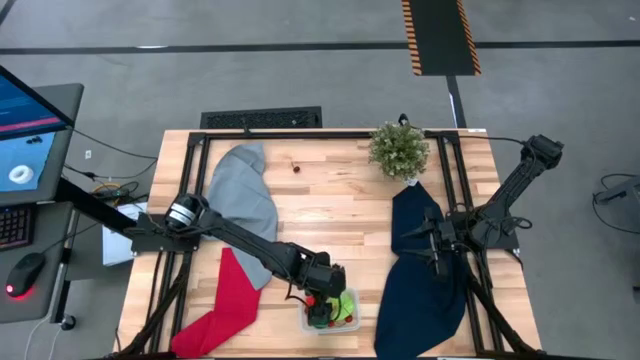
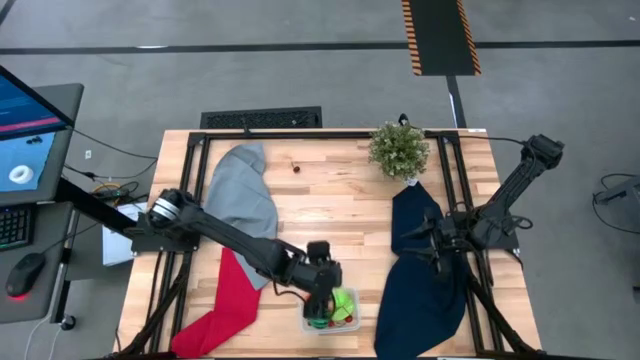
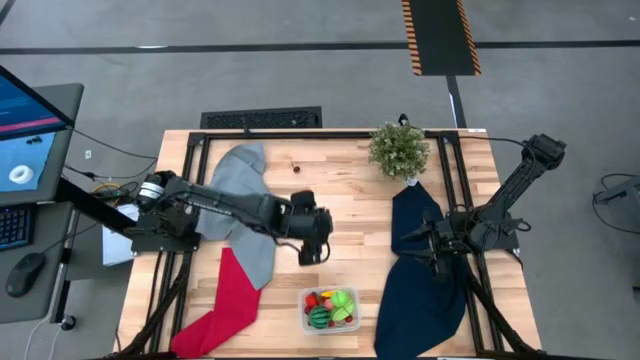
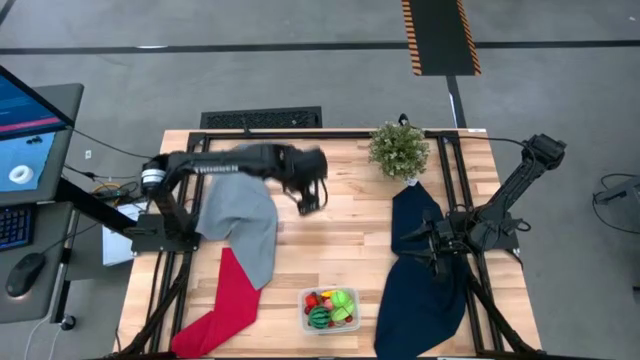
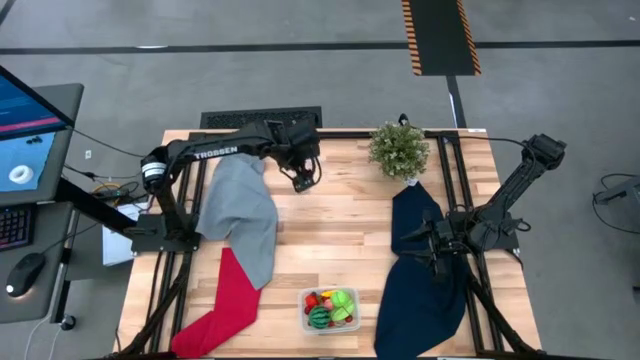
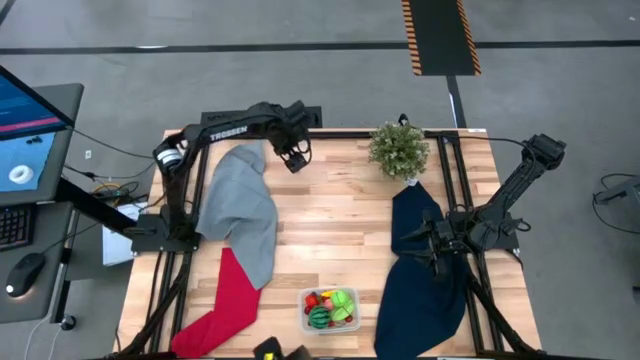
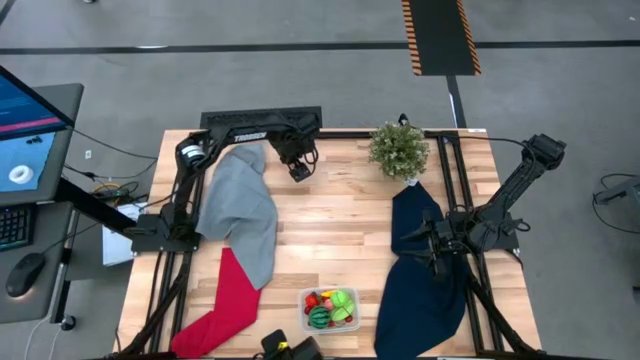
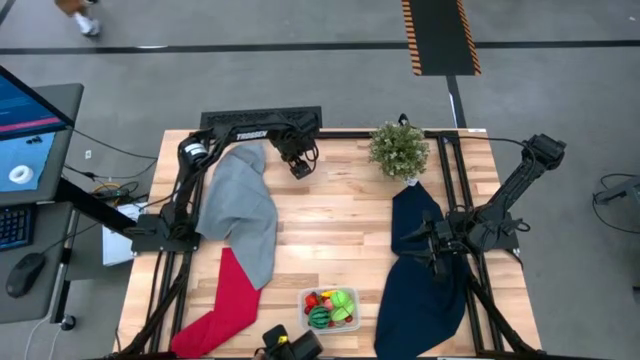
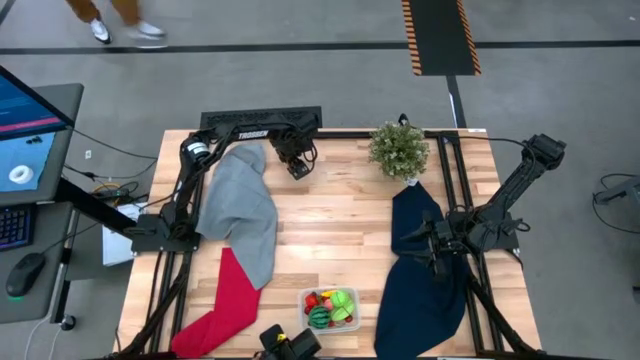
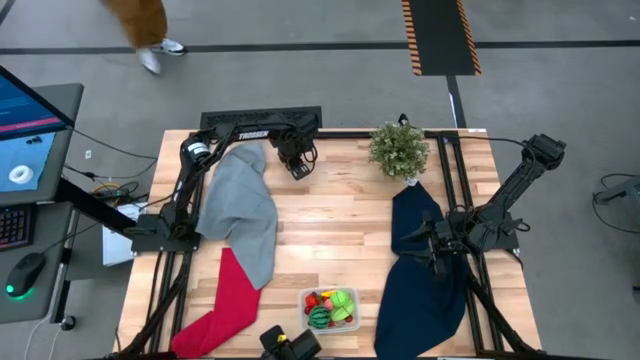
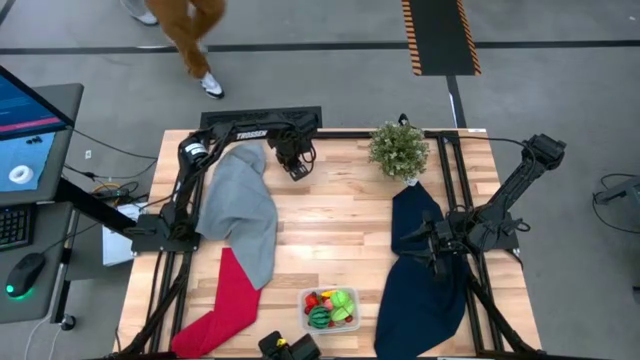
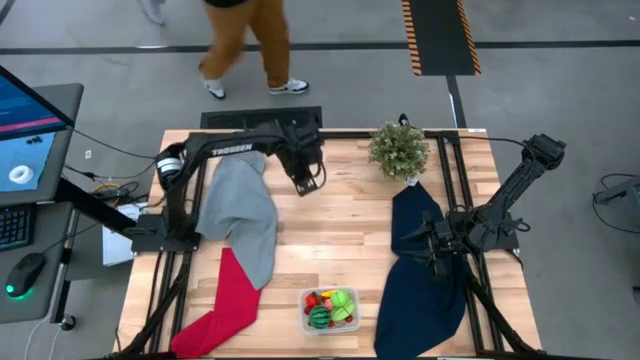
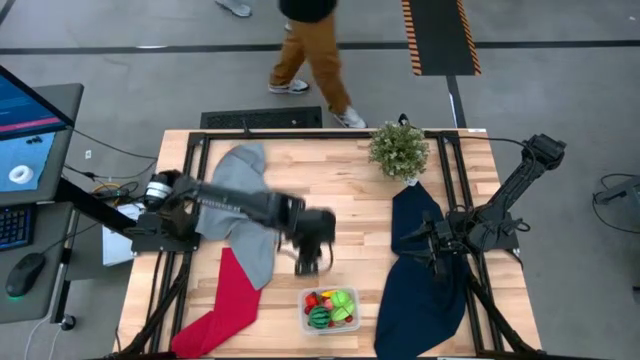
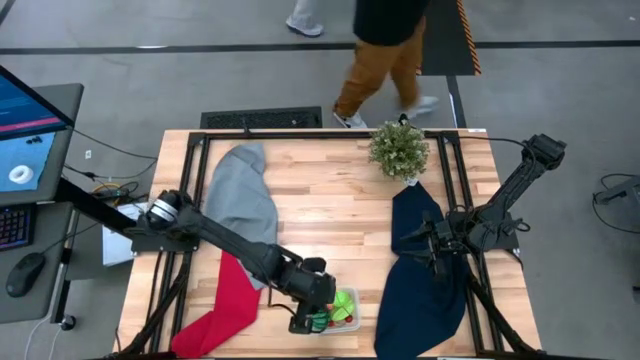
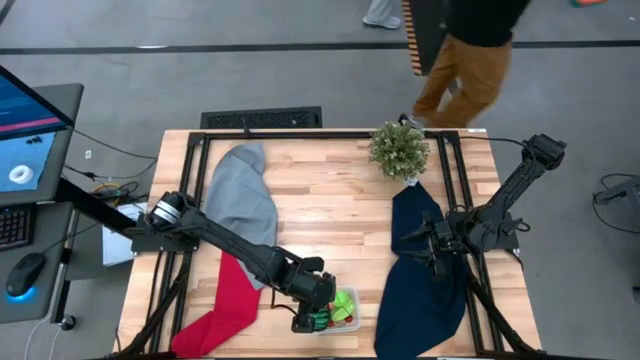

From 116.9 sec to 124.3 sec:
Task: Pick and placing Produce into tupperware
Put the cherry into the transparent bin

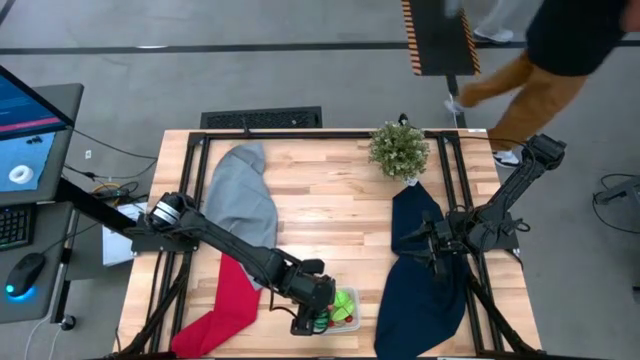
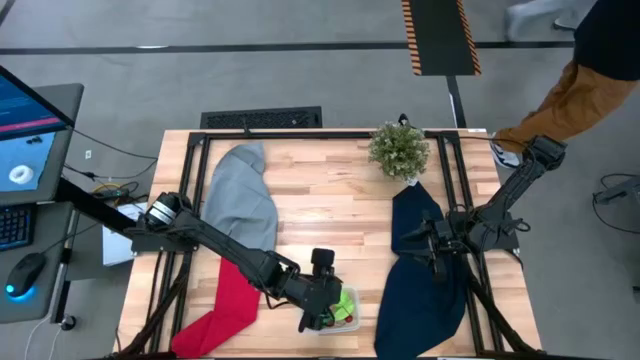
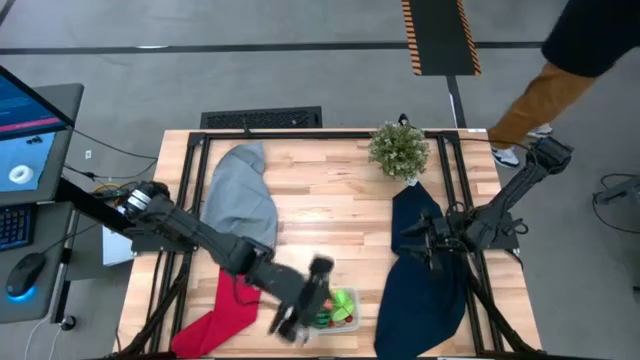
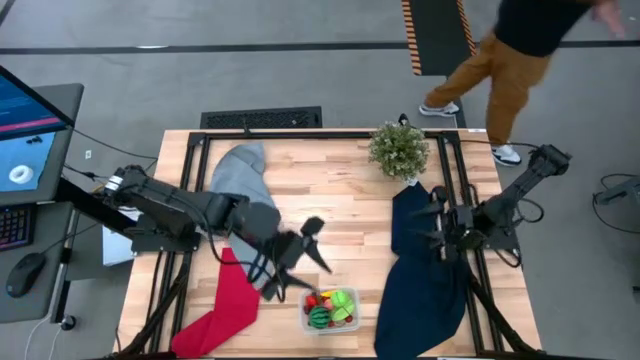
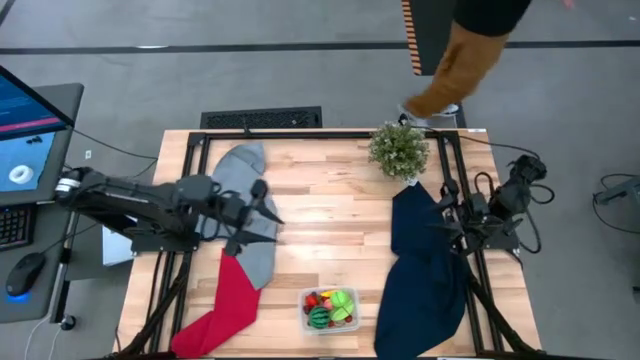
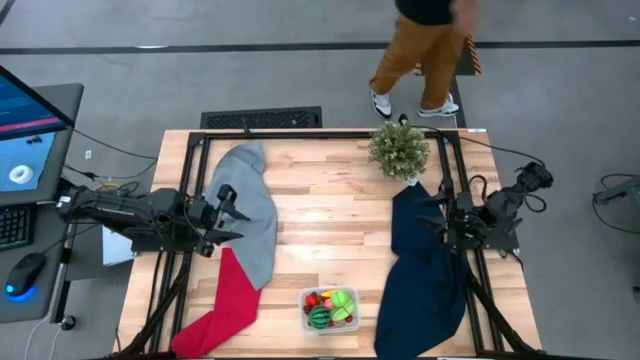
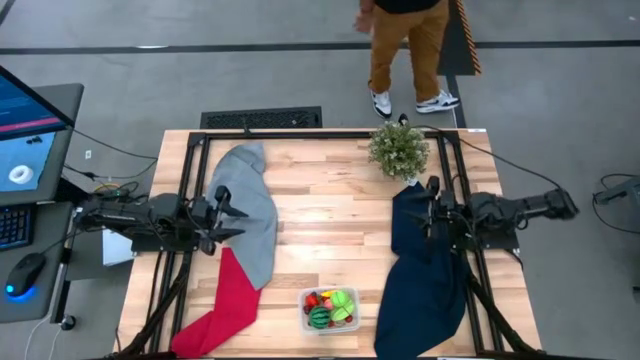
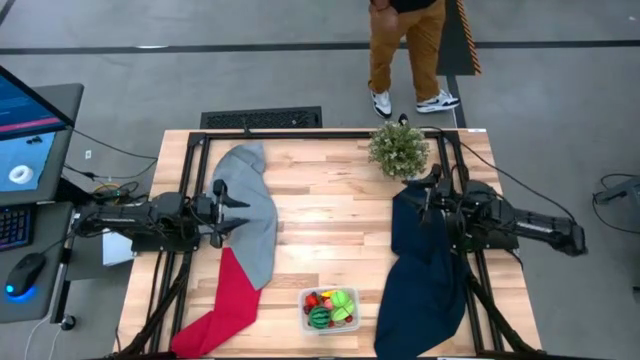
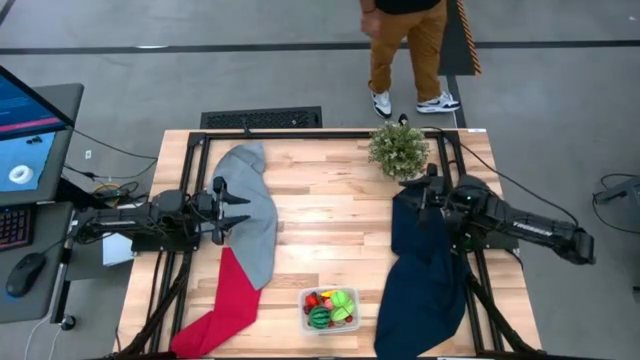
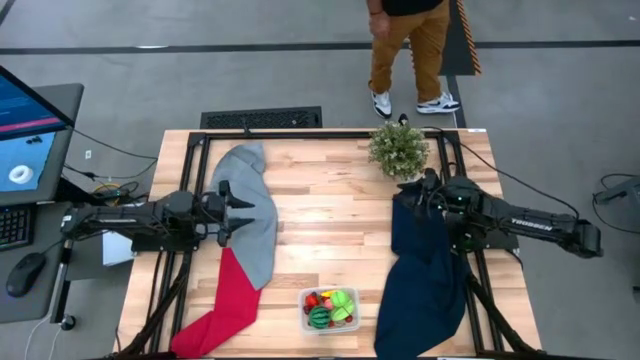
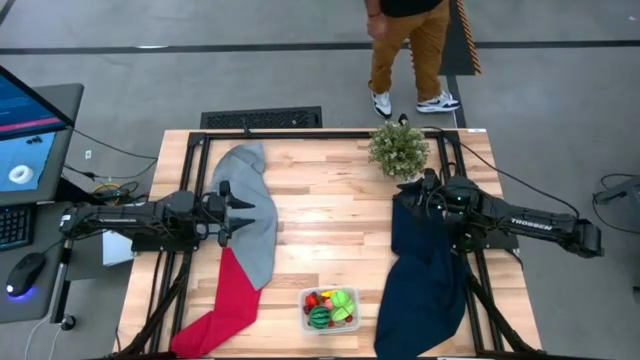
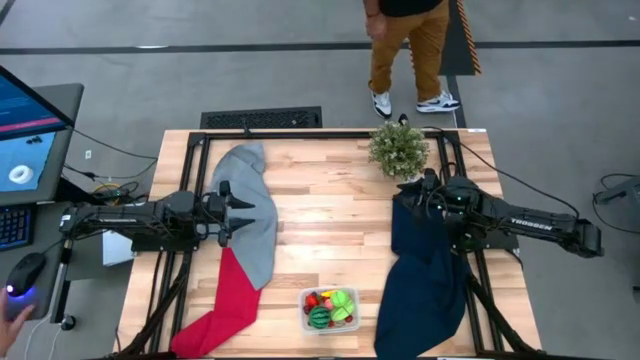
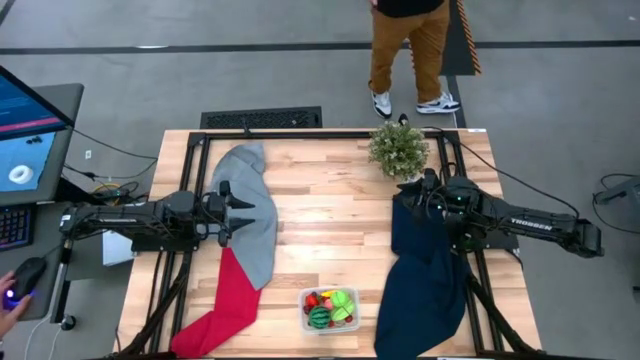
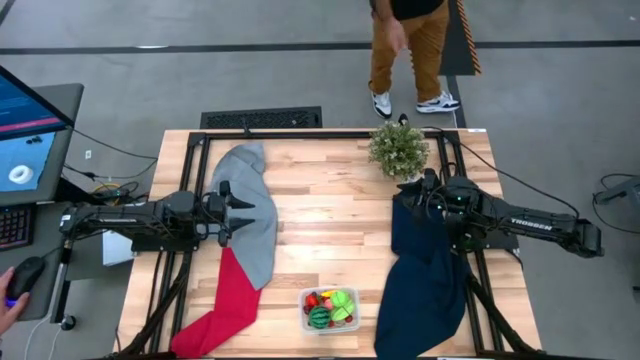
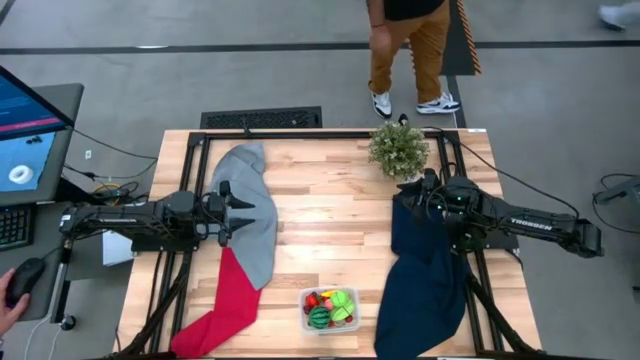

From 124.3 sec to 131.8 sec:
Return to Home Position

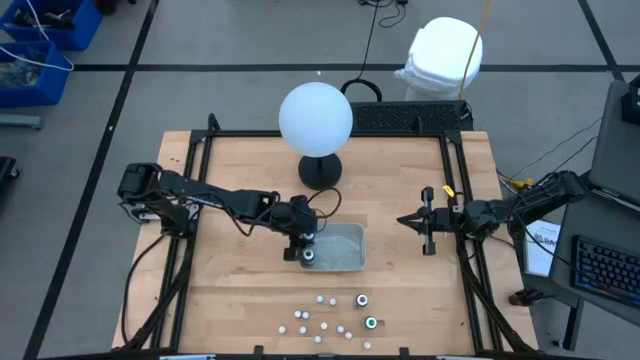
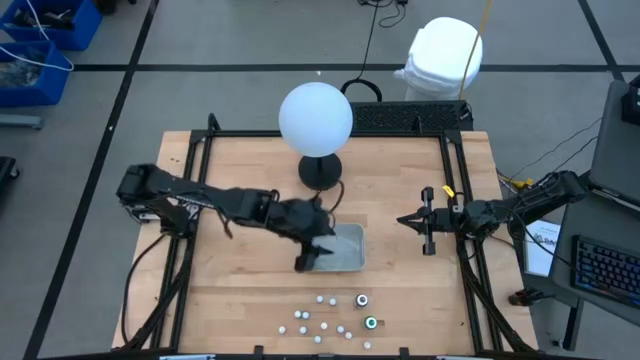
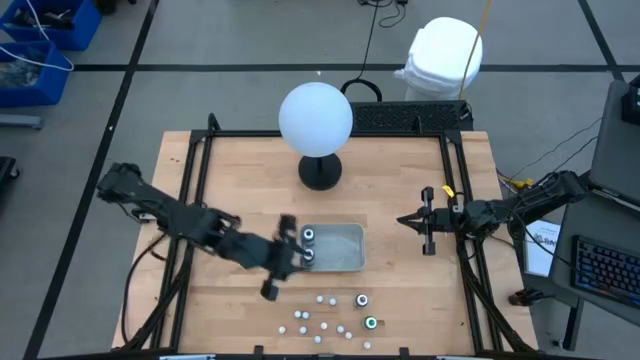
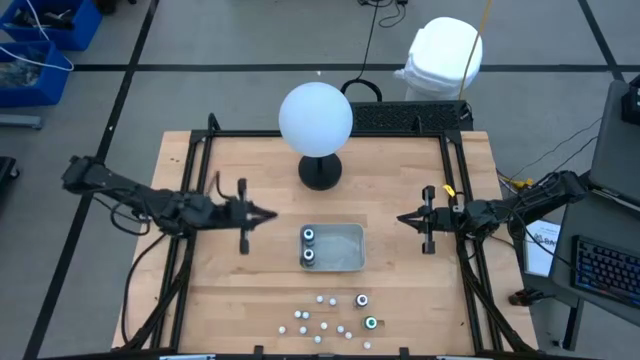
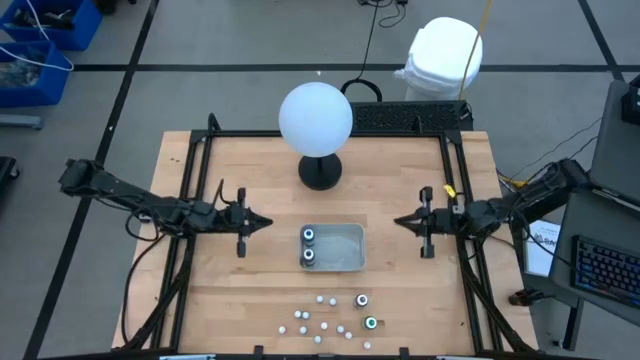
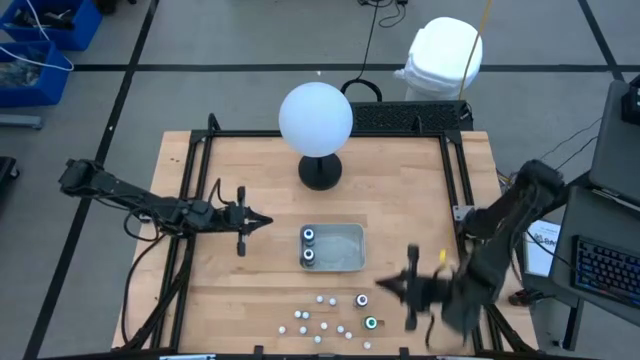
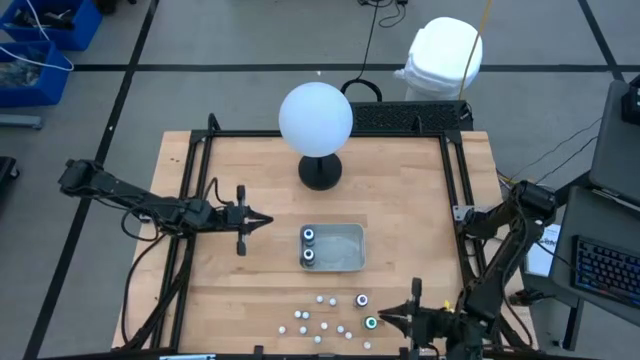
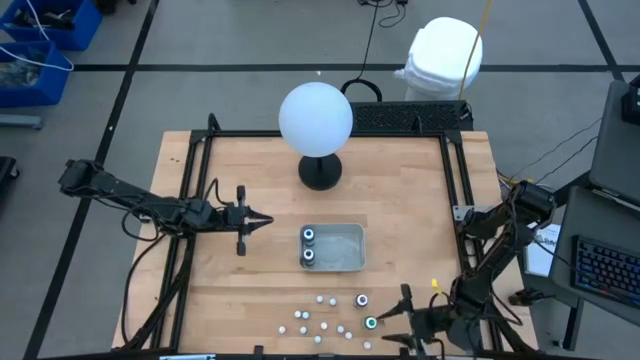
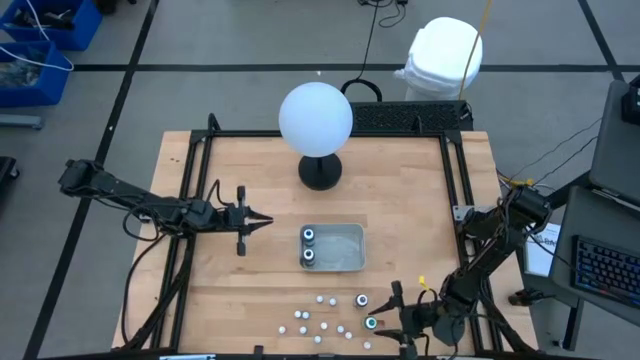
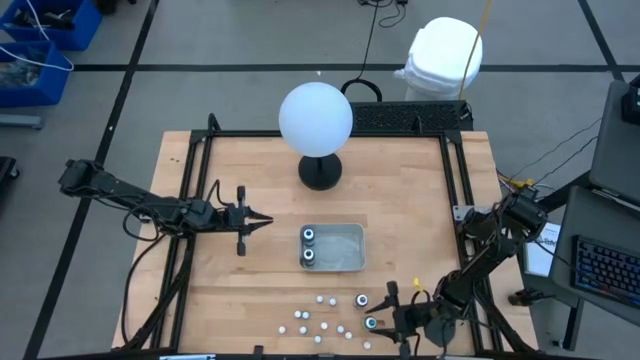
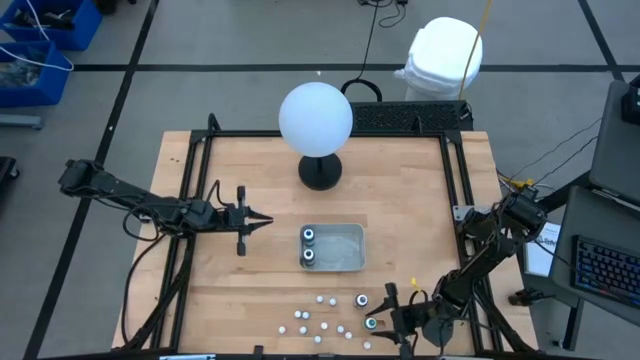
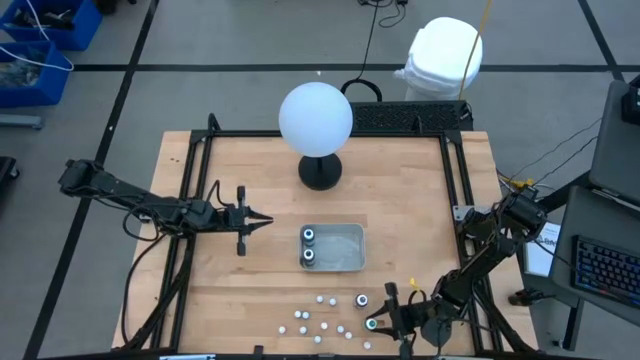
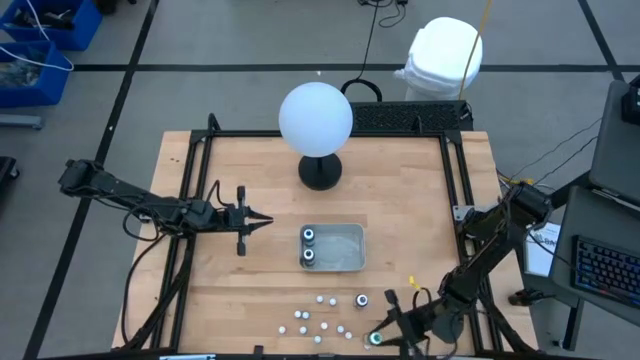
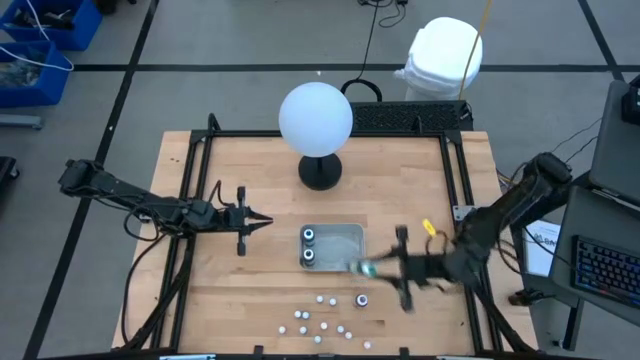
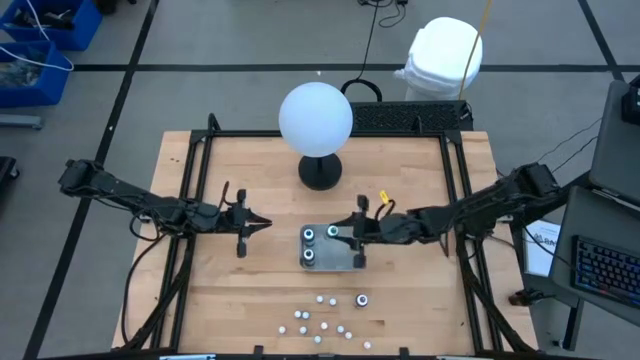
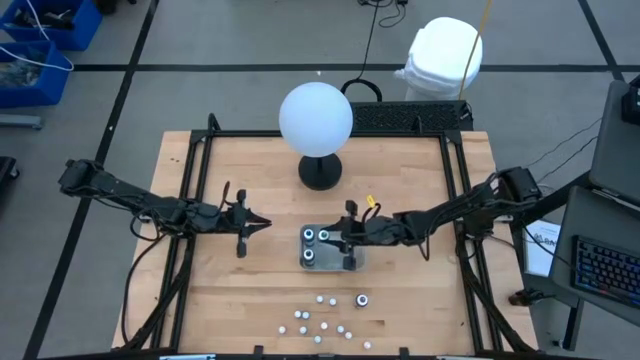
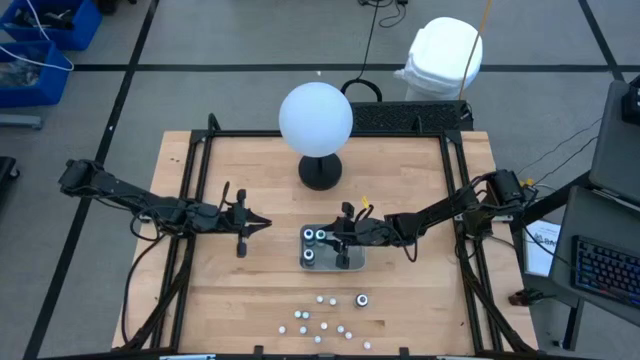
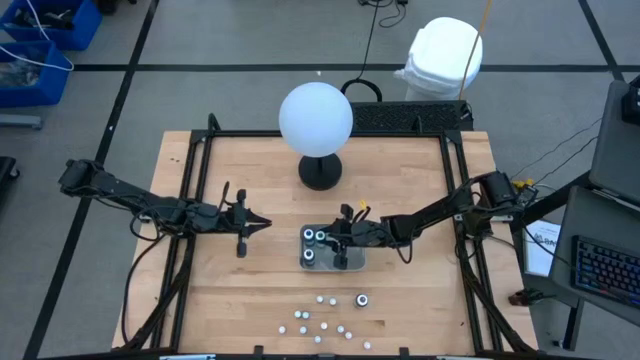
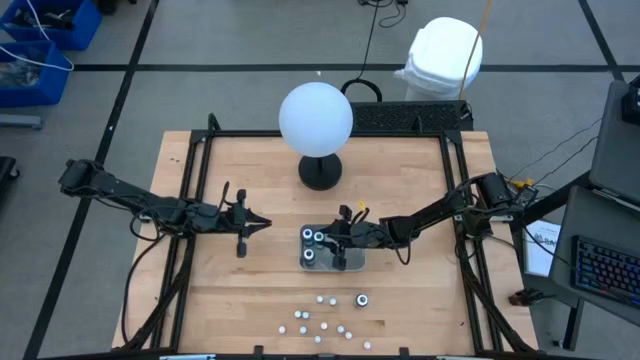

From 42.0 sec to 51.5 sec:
Task: Pick & Place food coloring
Put the large green food coloring bottle into the gray bin
